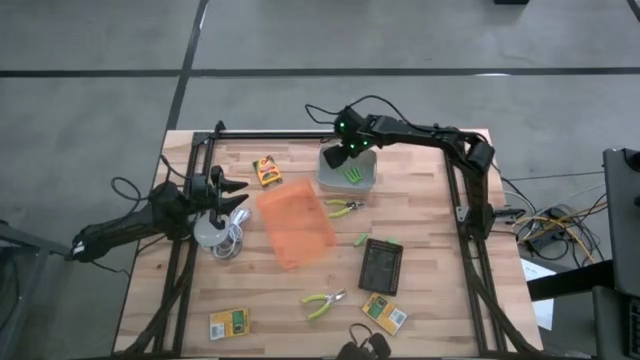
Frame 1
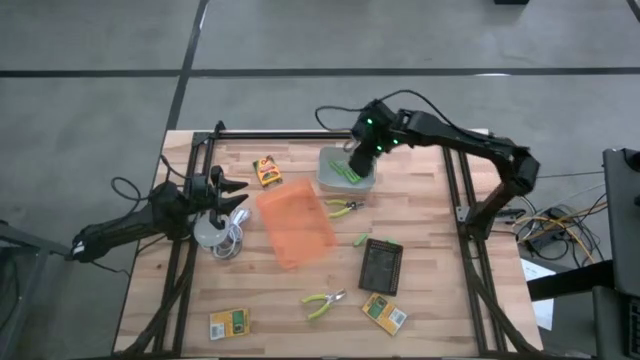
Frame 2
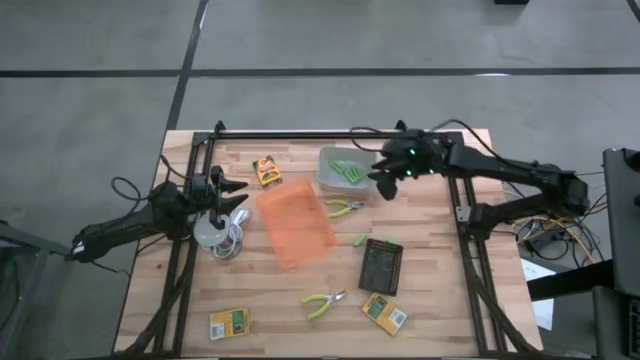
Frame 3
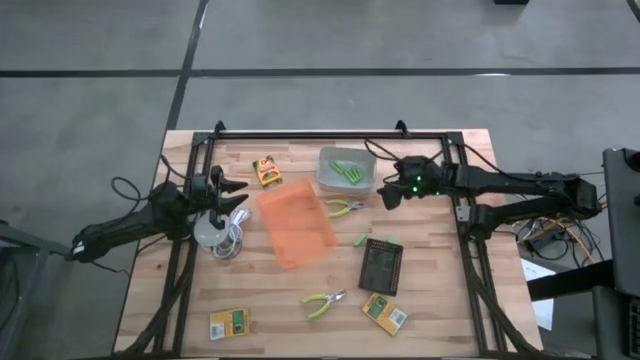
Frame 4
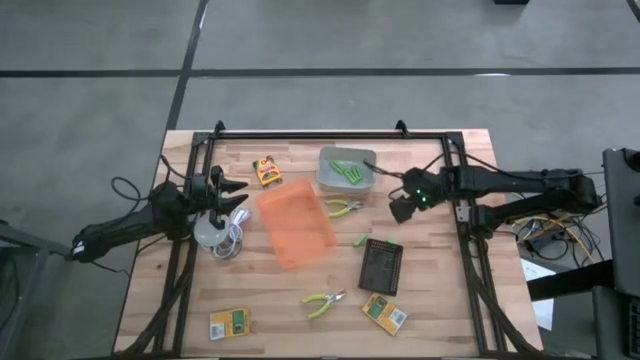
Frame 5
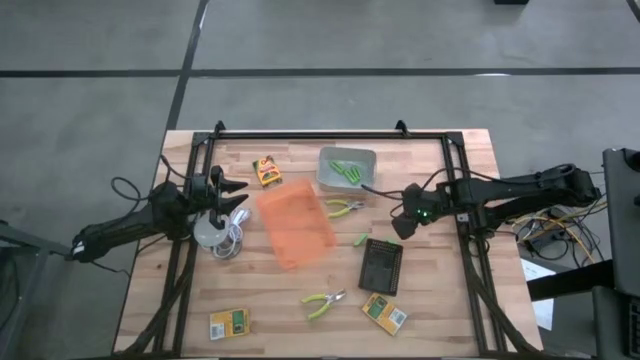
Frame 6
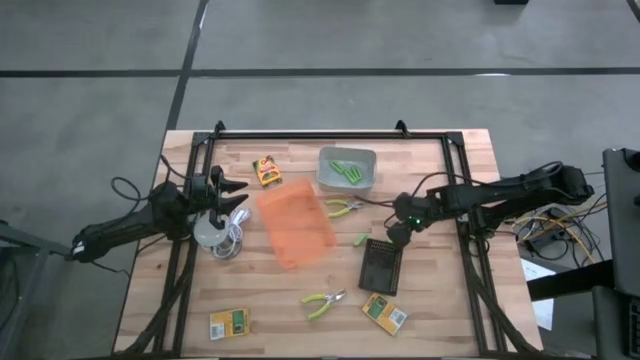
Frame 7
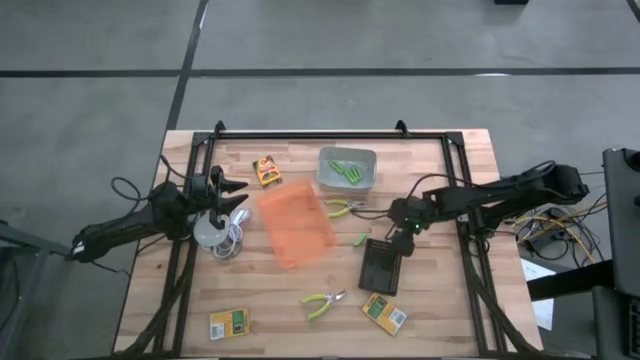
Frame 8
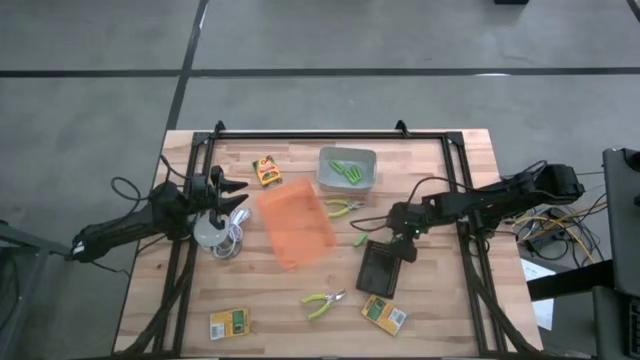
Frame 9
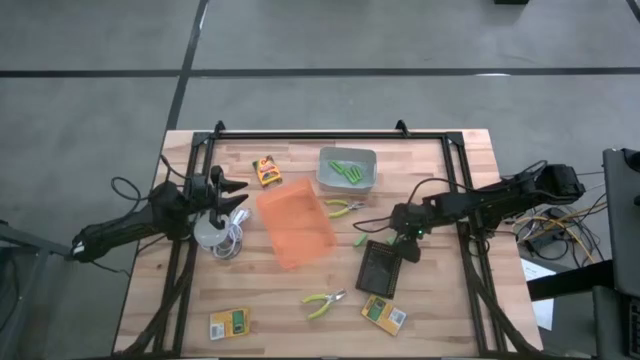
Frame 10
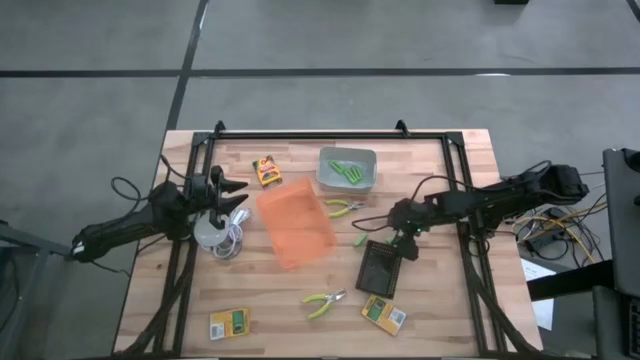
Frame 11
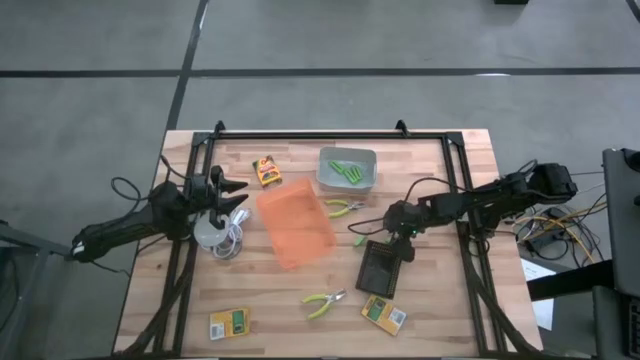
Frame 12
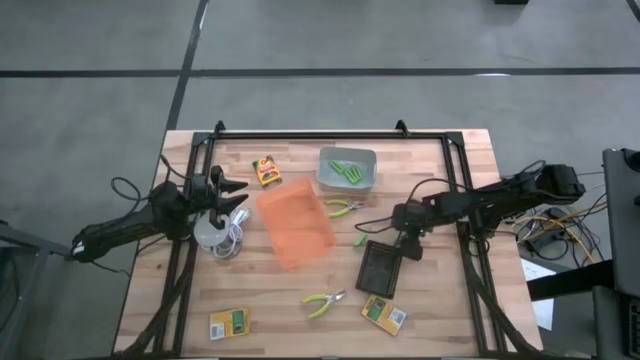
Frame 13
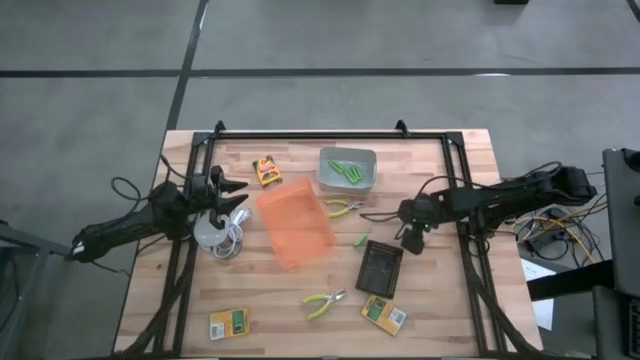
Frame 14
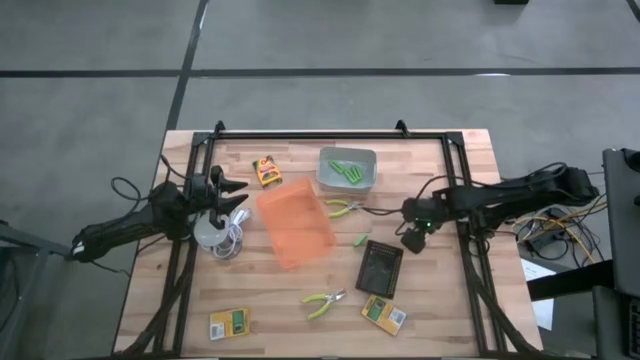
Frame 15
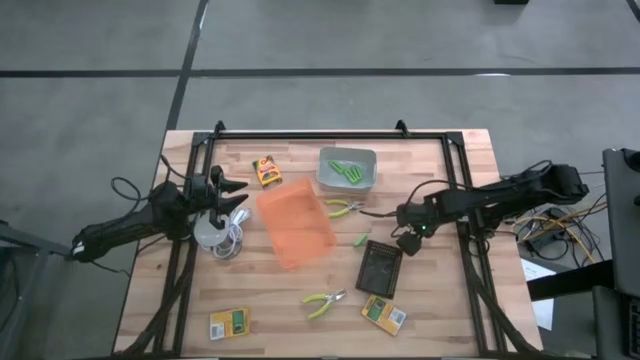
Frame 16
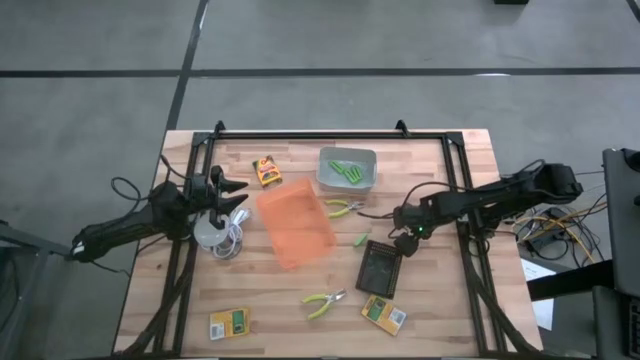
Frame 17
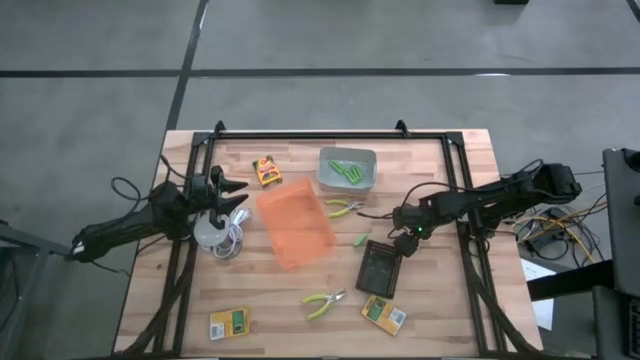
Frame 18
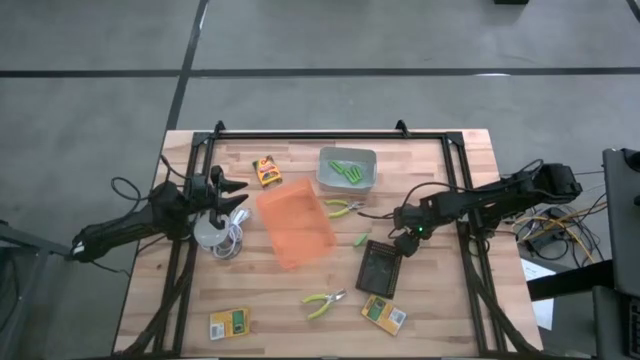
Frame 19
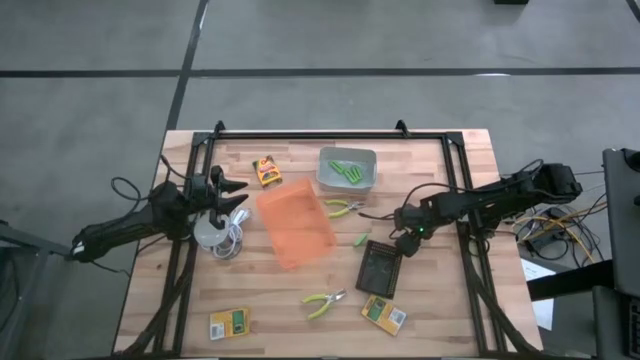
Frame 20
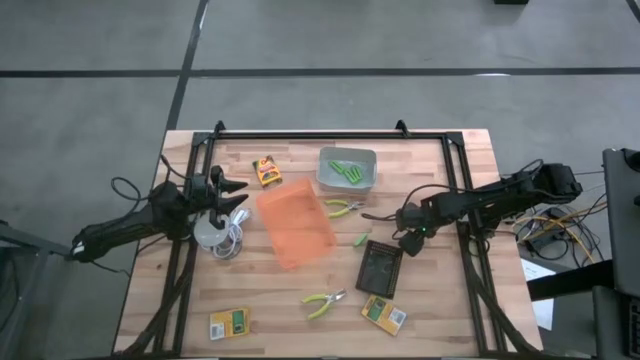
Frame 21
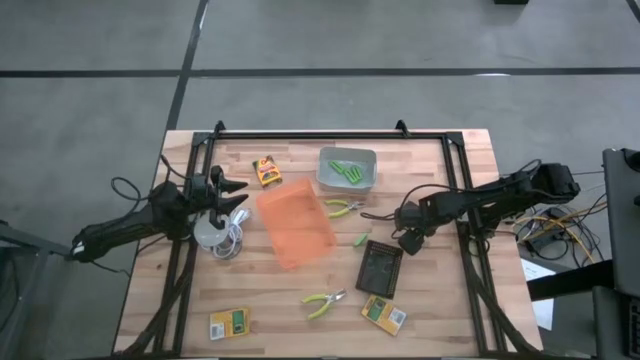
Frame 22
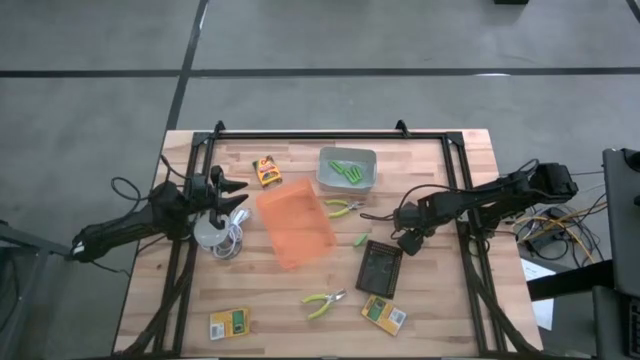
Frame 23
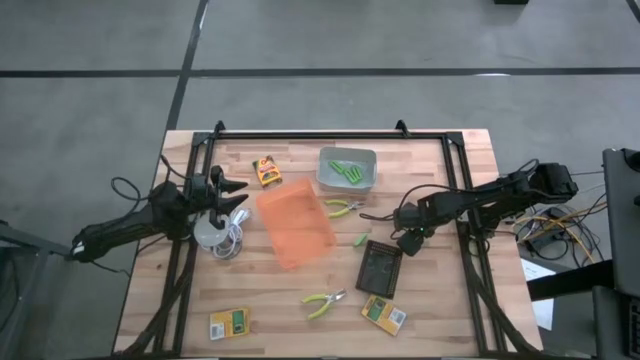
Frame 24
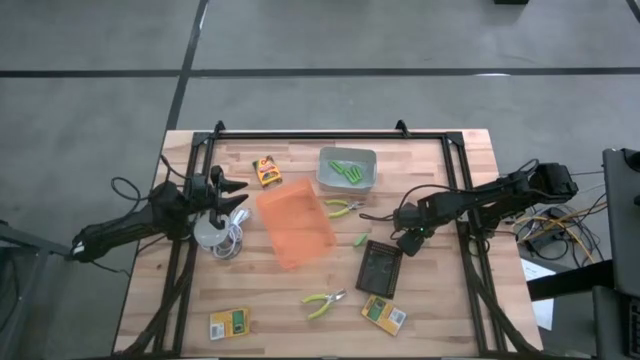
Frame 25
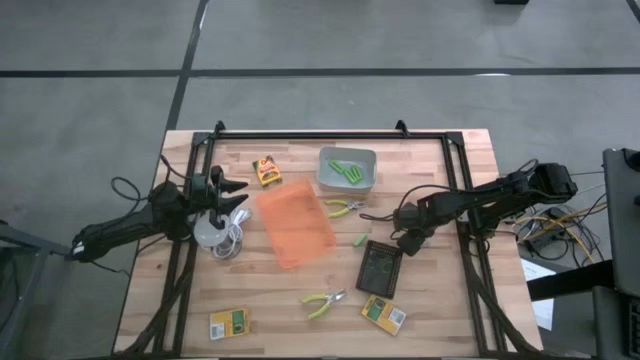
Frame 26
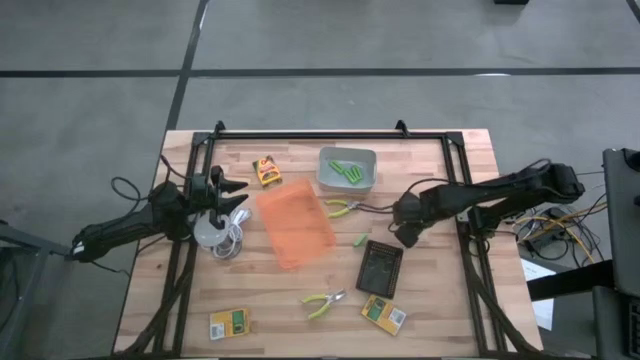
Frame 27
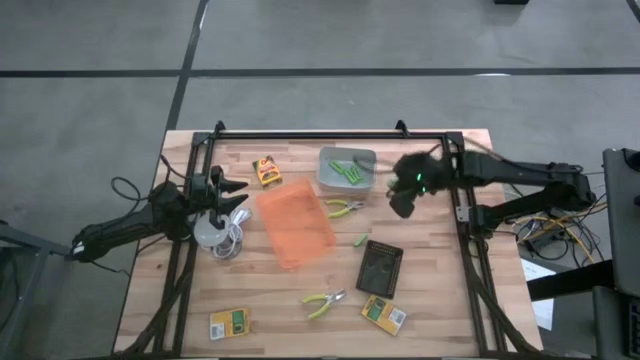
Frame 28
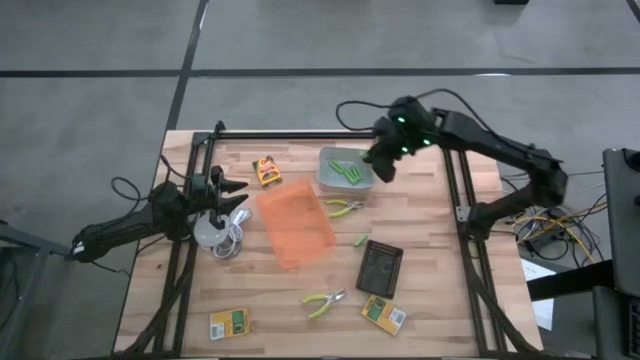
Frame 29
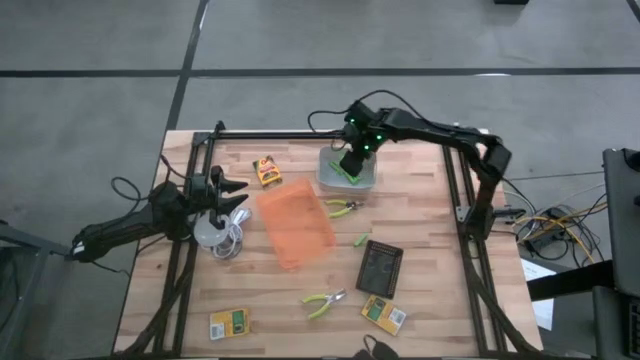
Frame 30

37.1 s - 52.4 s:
Task: Pick & Place School Supplies
Put the green eraser into the gray bin

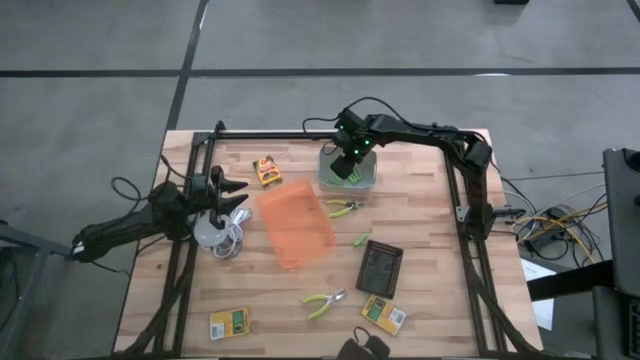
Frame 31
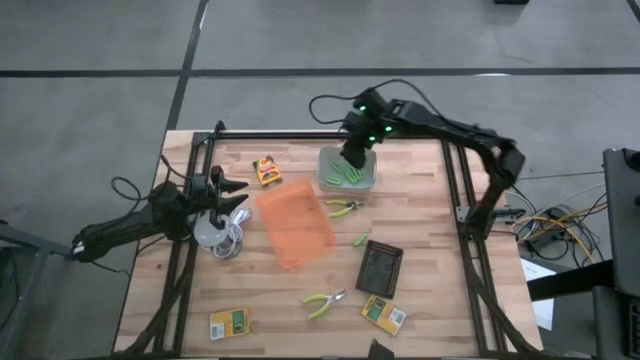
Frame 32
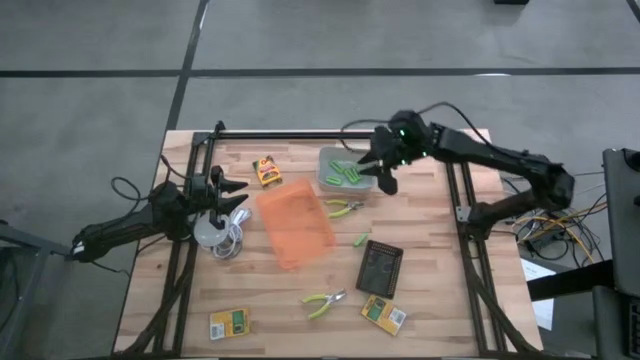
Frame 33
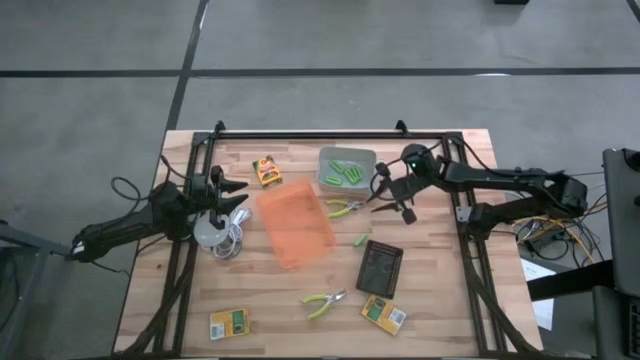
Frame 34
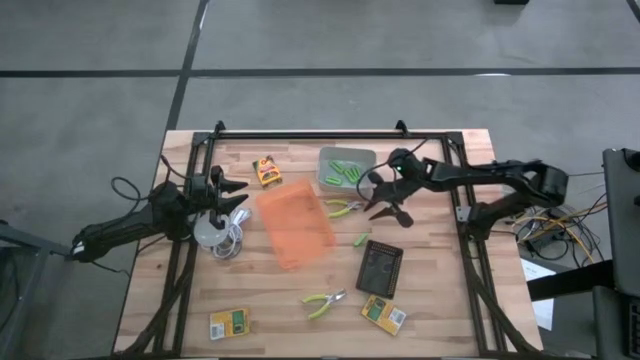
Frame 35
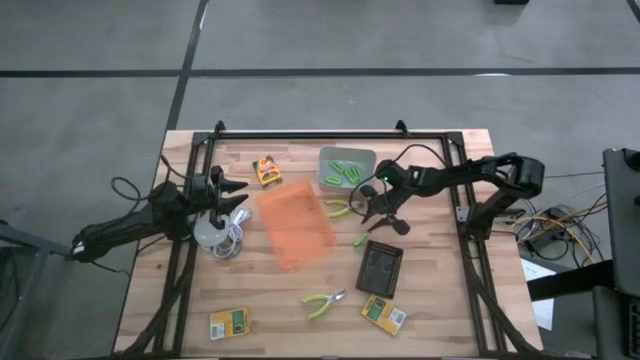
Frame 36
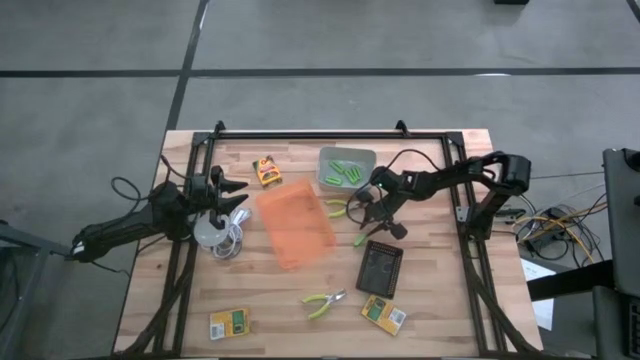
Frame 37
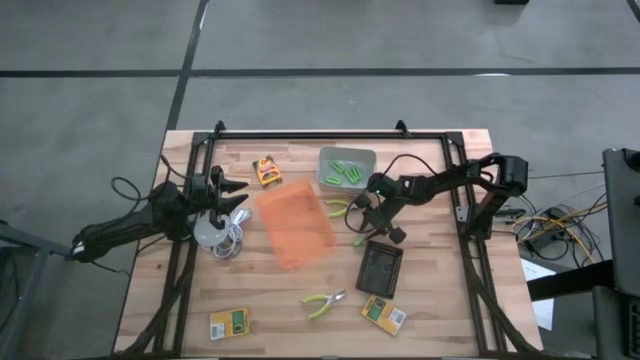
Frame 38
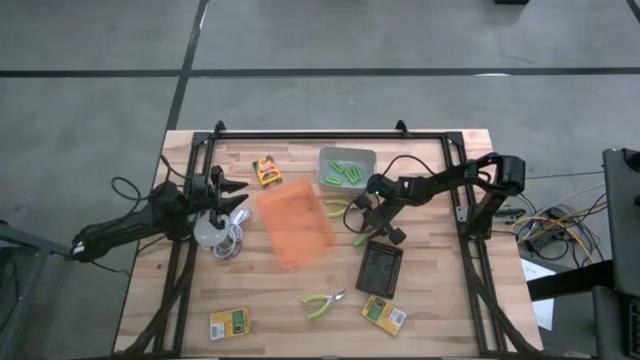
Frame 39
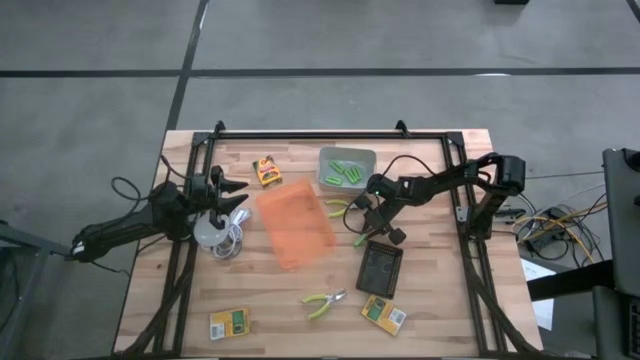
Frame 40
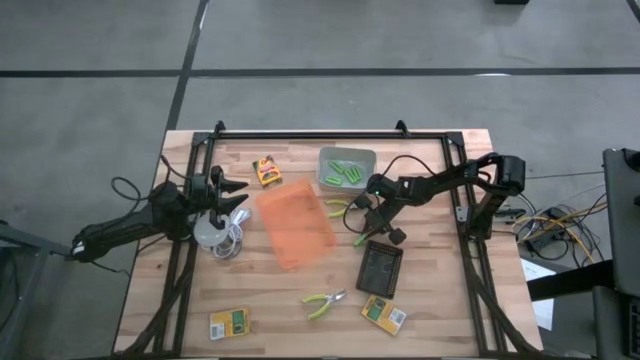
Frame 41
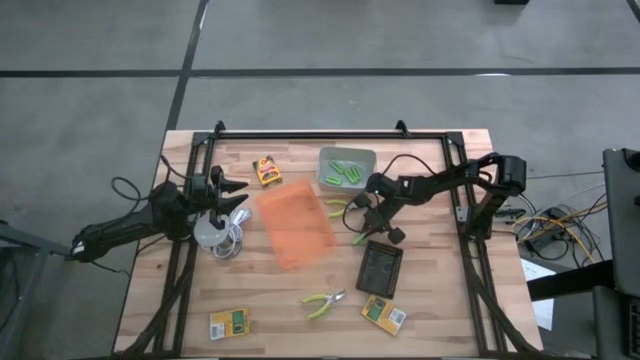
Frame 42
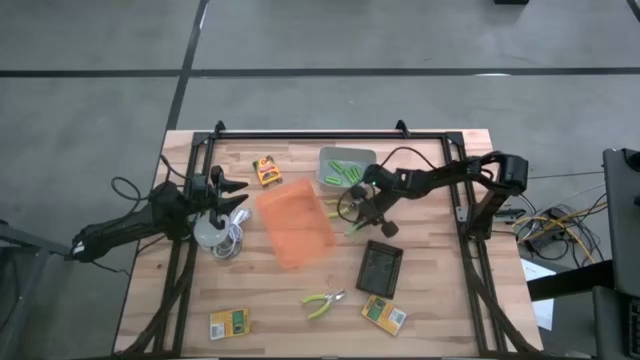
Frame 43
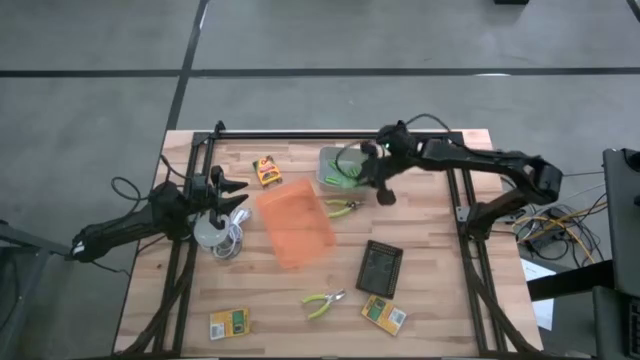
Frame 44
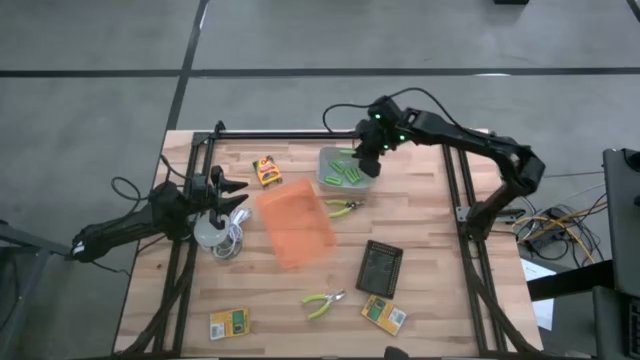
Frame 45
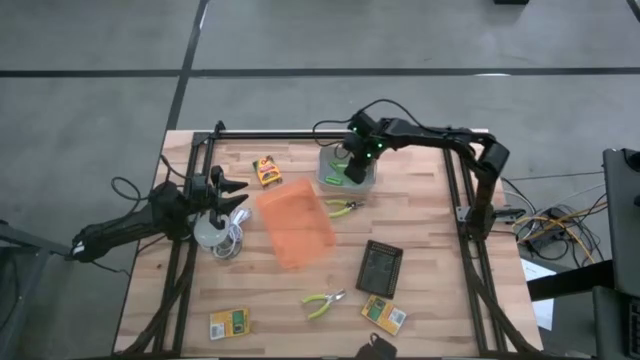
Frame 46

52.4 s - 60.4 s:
Put the green eraser into the gray bin
